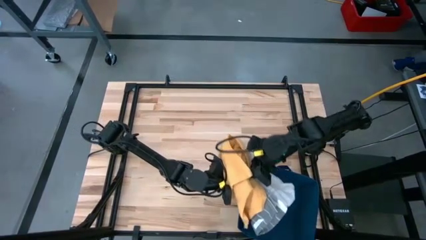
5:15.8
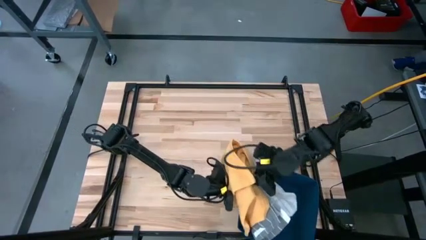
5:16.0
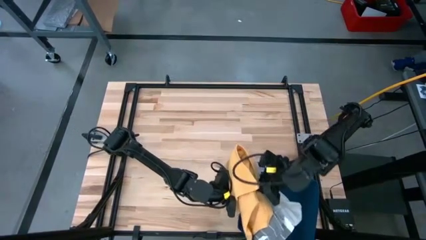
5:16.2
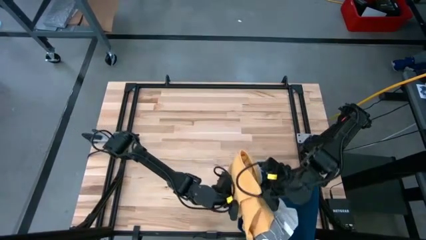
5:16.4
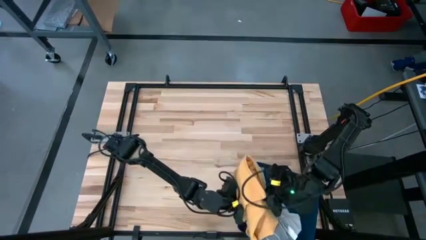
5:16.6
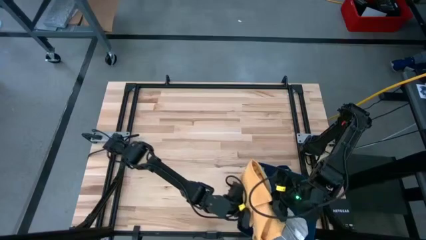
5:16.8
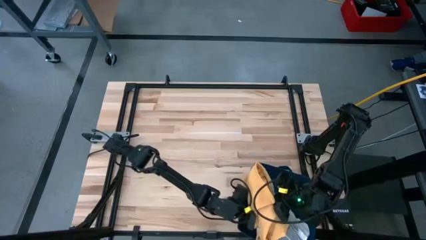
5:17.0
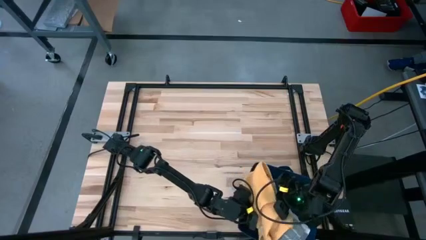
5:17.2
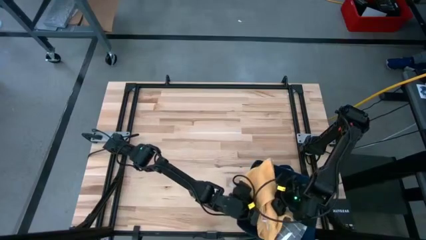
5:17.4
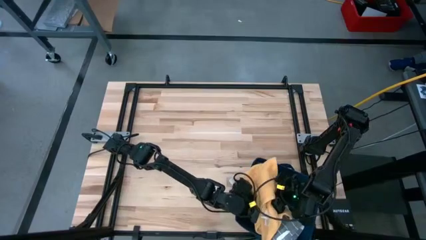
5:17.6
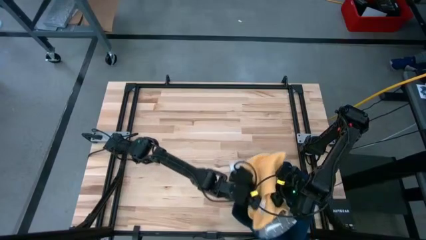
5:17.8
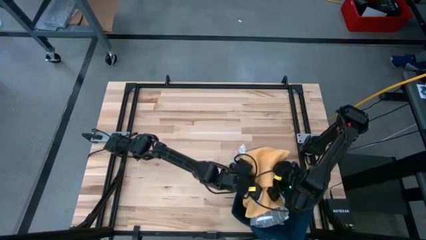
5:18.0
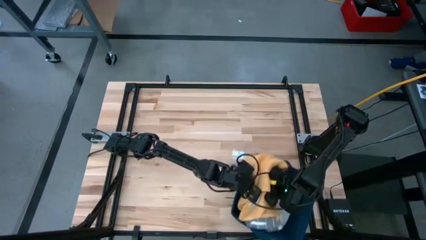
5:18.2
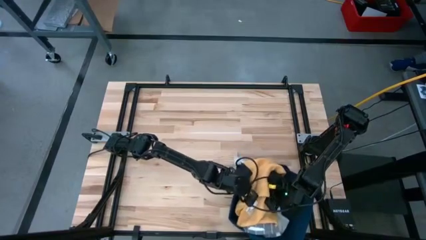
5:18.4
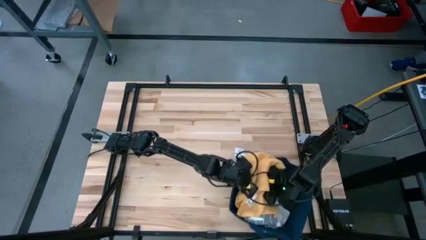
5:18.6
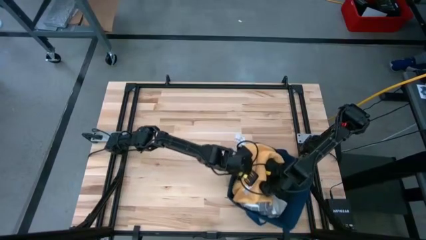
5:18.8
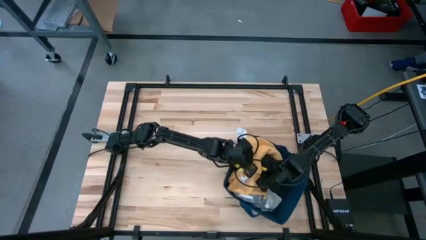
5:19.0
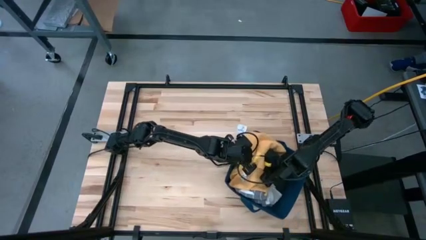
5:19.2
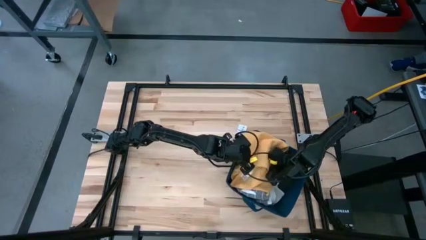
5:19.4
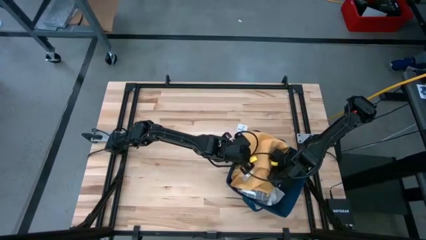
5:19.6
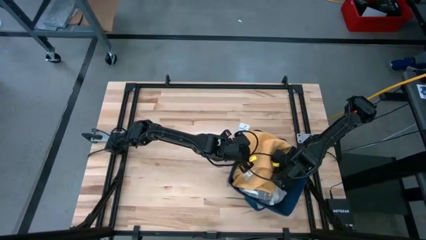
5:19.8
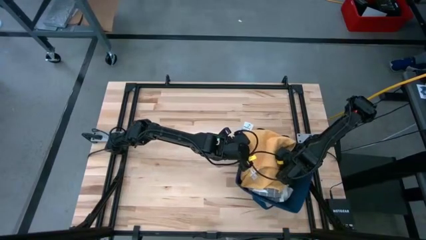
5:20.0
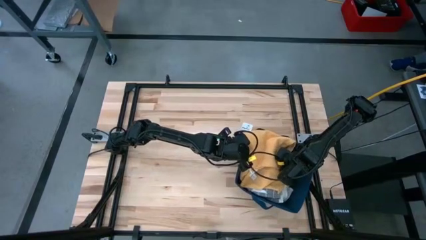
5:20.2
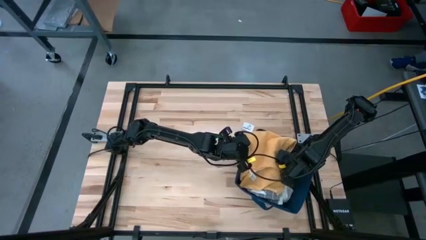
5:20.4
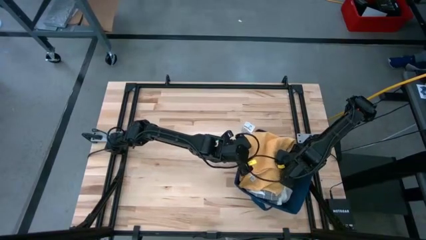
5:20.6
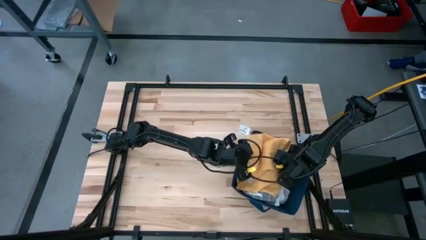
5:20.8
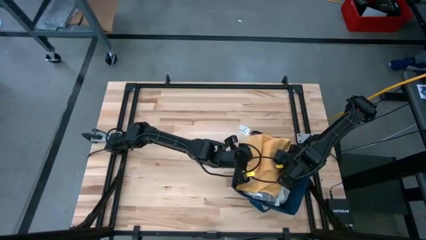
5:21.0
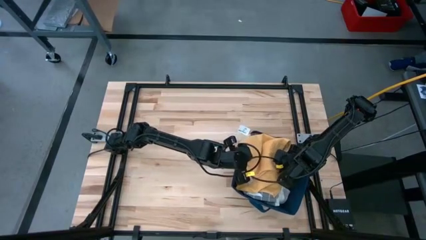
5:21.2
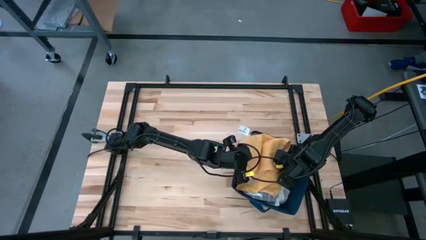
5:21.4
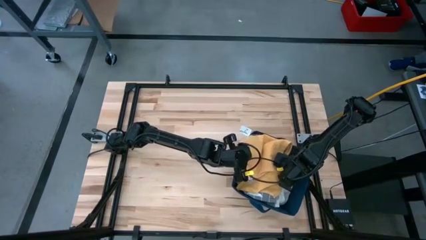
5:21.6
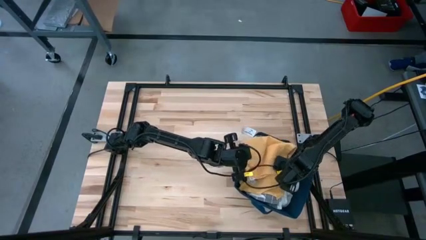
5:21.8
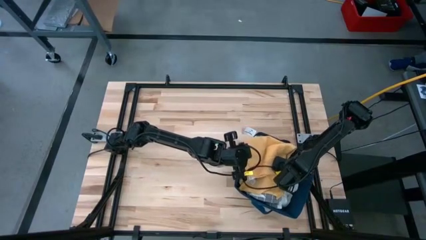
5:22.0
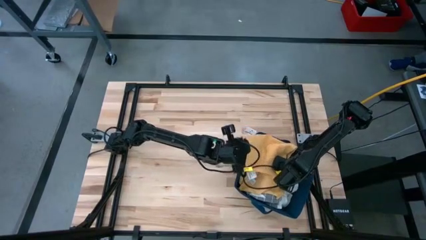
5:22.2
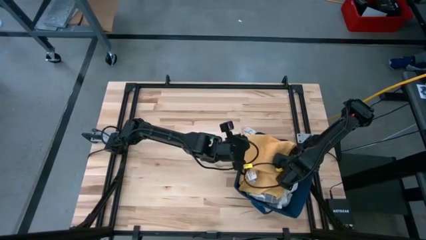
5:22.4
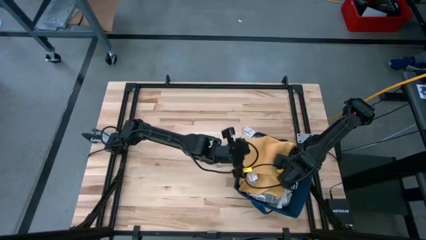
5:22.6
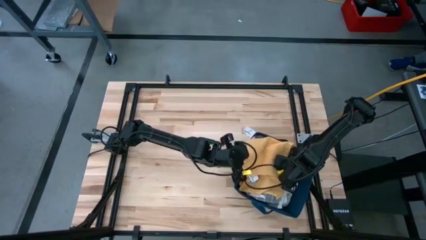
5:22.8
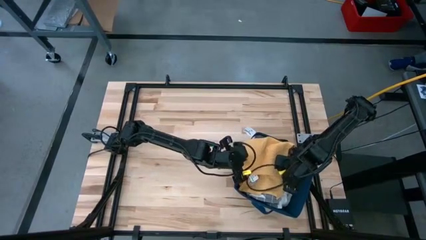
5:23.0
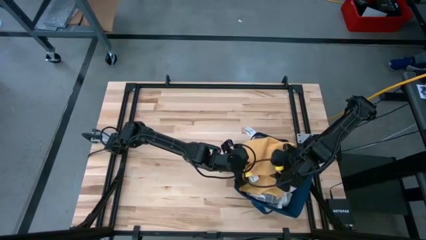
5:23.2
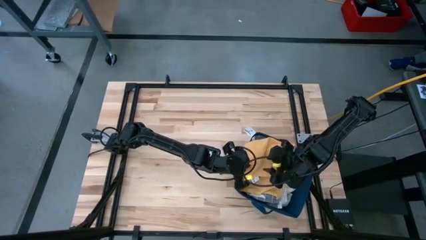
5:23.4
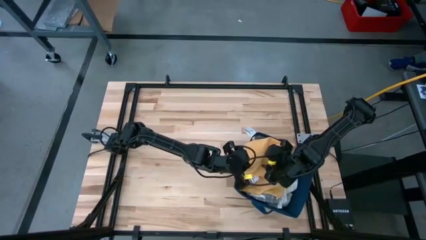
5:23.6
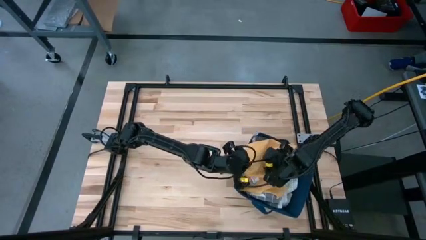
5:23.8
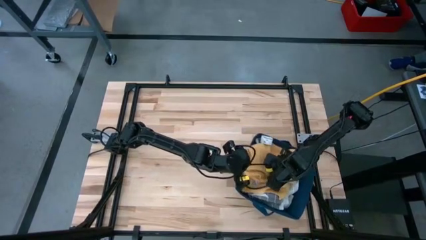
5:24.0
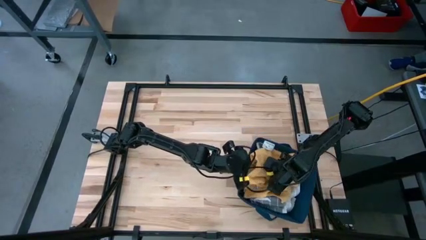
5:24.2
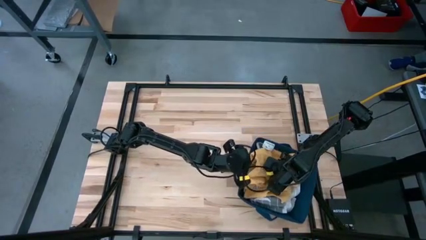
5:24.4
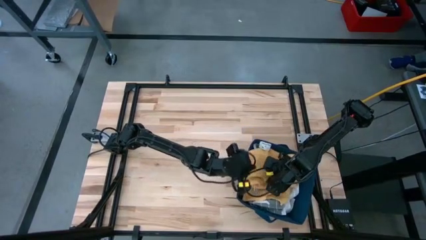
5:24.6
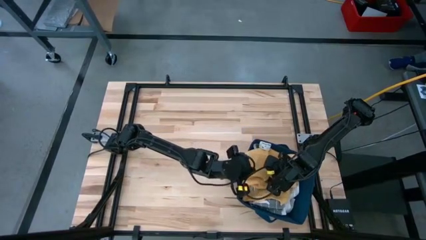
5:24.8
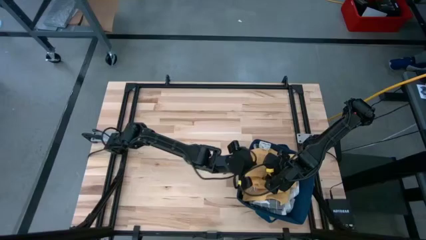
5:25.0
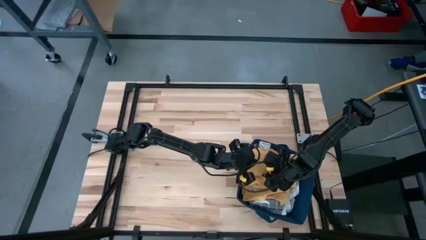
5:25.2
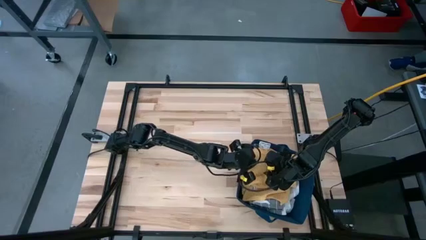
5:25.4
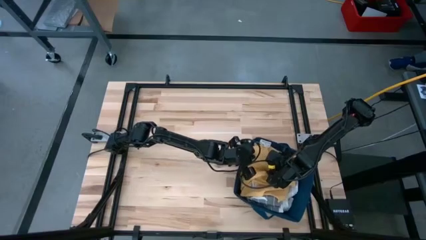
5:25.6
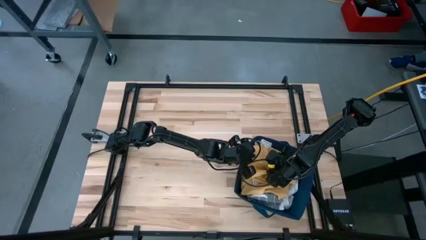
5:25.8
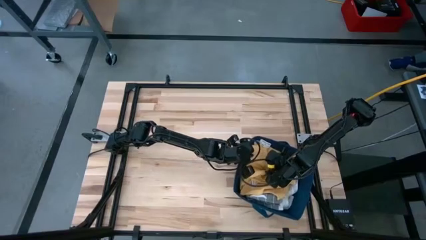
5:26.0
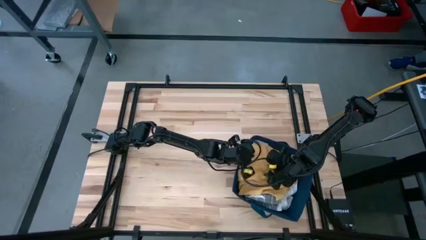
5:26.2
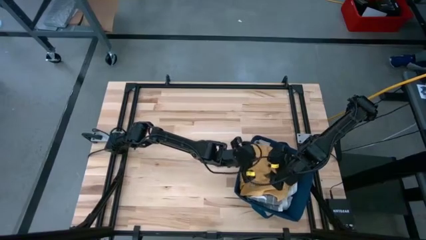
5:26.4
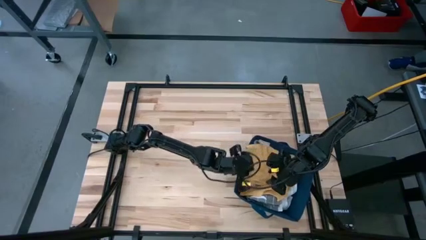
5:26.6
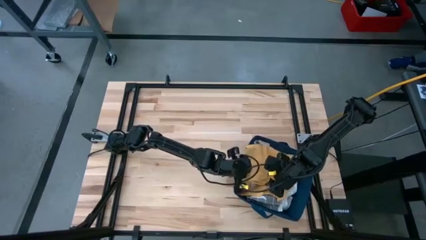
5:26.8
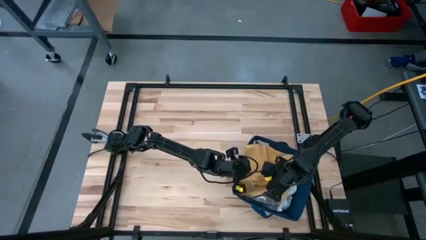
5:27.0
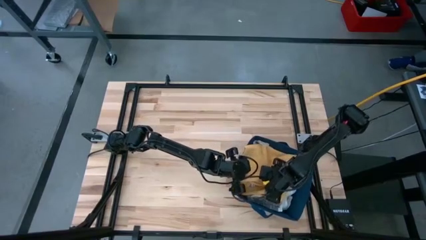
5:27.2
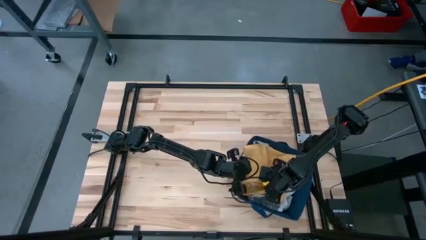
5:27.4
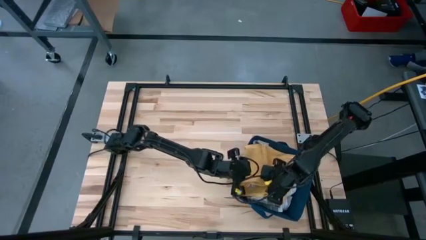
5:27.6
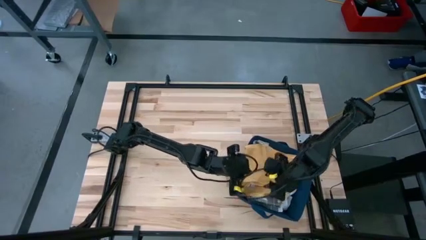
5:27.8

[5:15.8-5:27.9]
Task: Fold towel
Put the kitchen towels into the blue laundry bin
